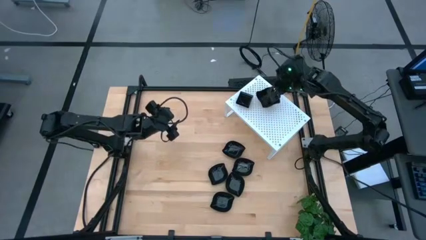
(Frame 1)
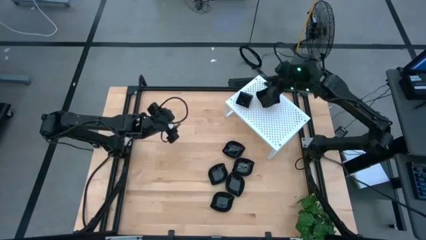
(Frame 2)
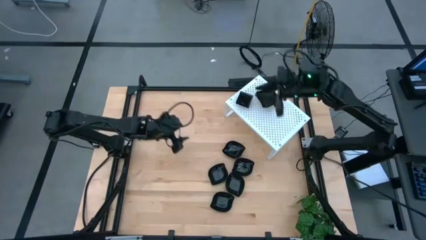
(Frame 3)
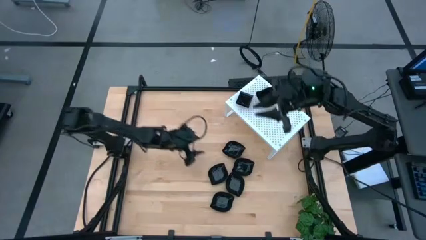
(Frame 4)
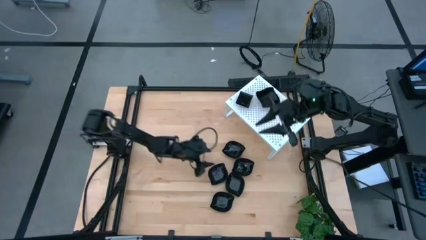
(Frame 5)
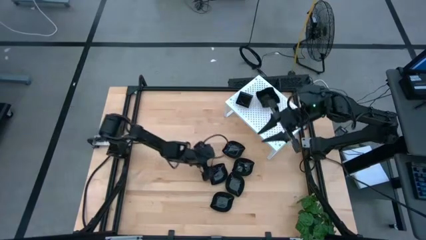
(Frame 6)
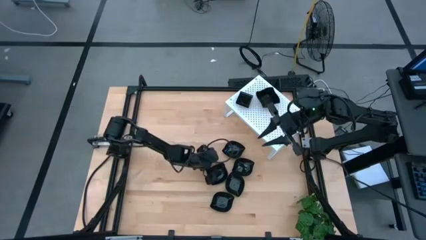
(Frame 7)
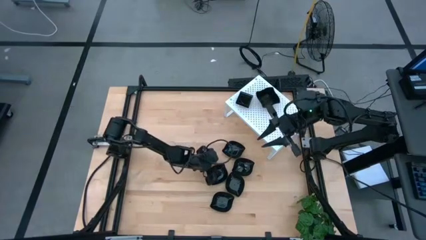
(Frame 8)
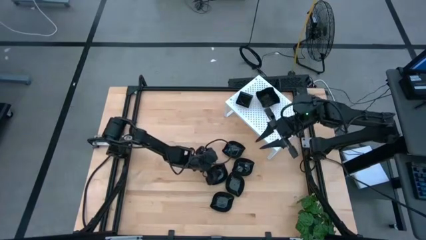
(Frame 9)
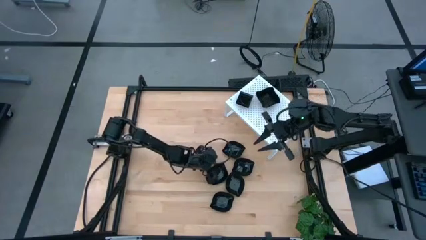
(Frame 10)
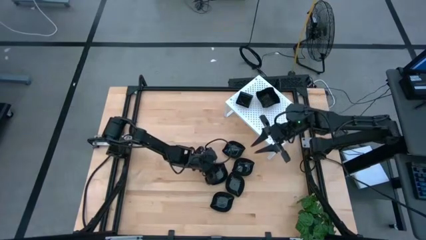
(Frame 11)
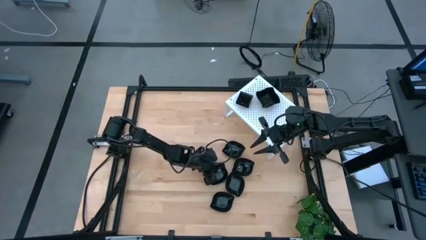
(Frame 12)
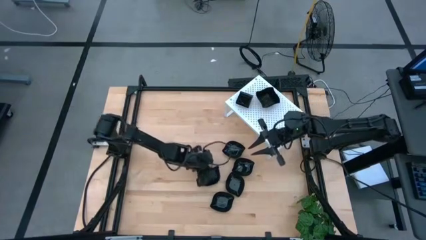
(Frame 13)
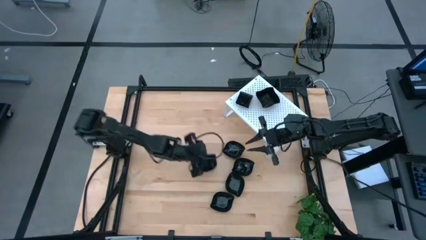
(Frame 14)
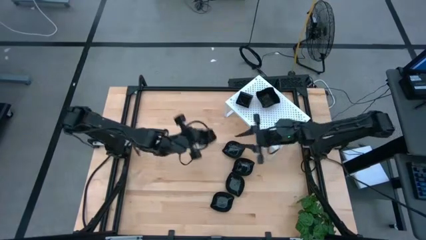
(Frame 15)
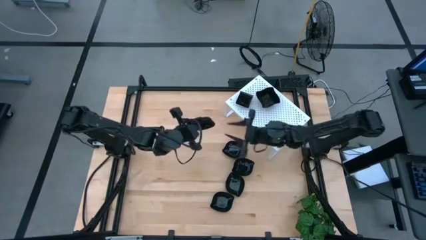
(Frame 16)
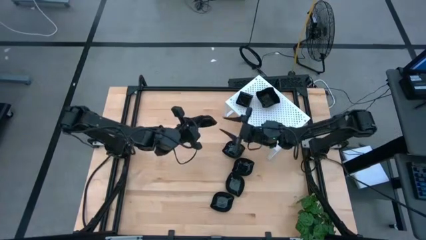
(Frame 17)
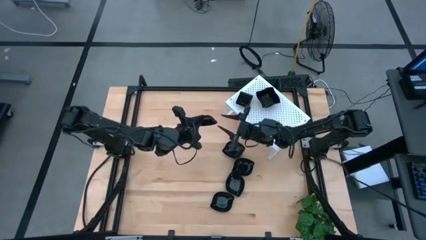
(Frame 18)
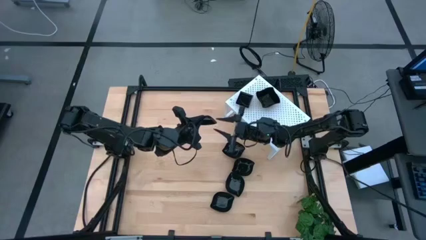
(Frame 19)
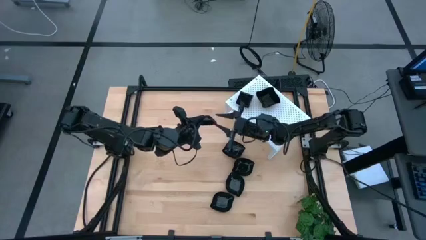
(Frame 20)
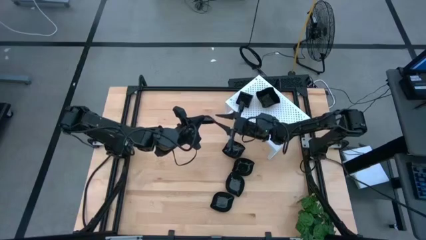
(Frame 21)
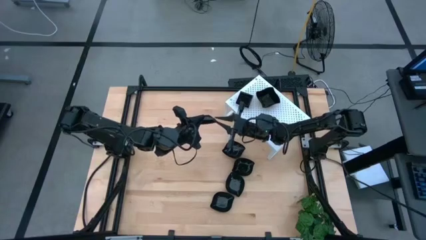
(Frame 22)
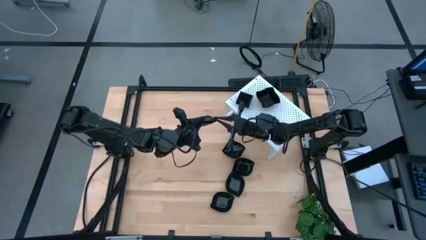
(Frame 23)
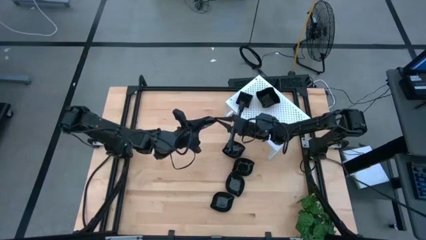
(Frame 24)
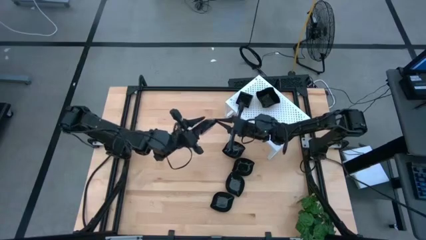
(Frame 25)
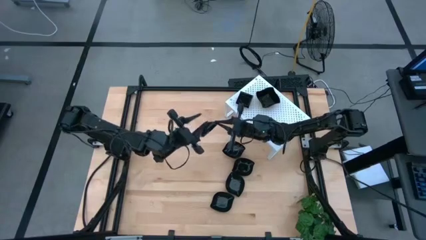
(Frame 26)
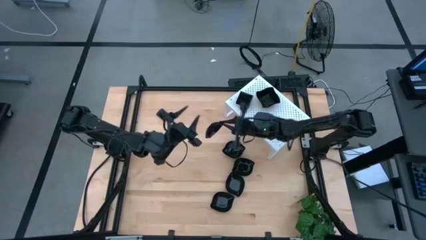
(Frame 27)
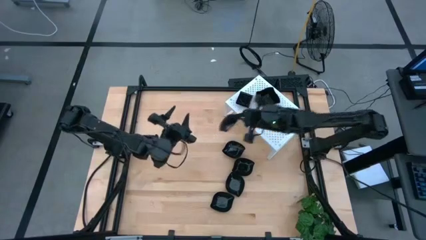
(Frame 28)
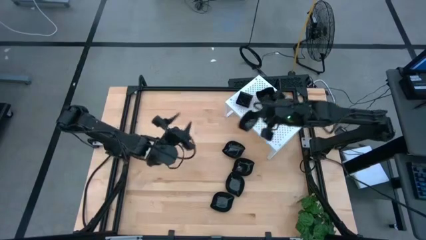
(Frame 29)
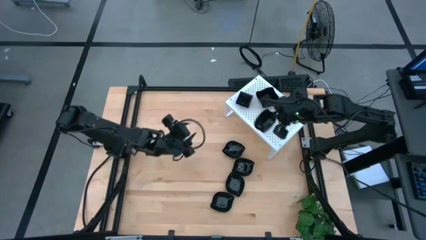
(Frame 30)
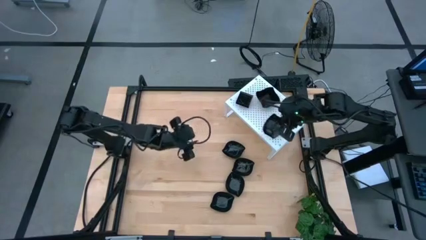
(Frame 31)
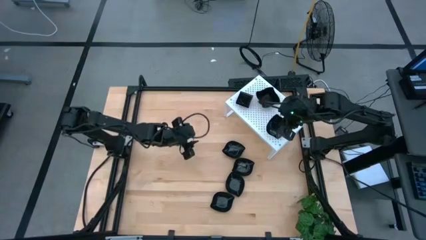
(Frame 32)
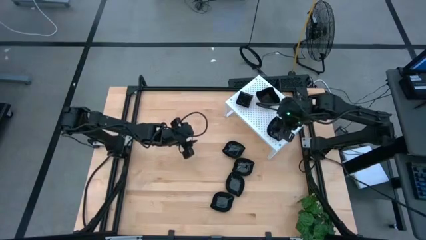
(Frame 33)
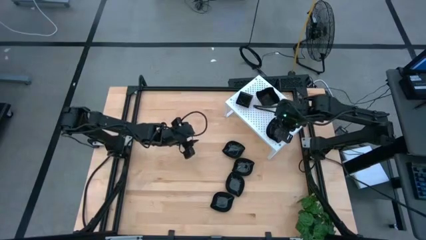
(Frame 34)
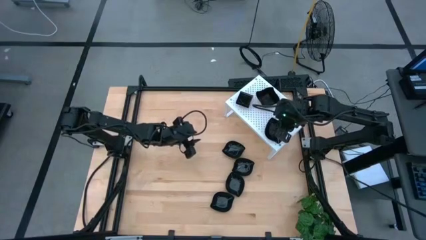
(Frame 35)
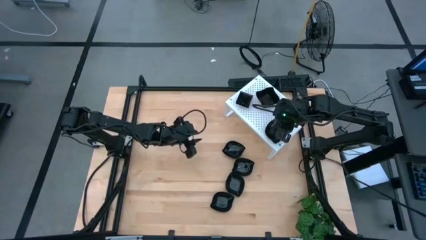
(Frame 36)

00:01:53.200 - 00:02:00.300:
Task: Pick & Place Mini shaped plates
Put the black leaf shaped plate on the shelf

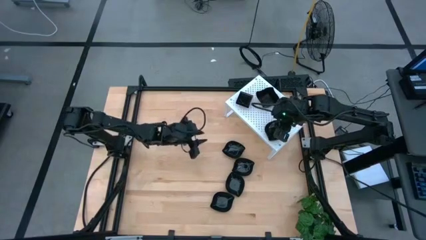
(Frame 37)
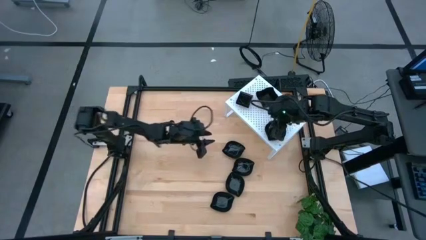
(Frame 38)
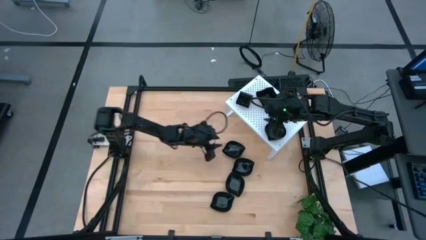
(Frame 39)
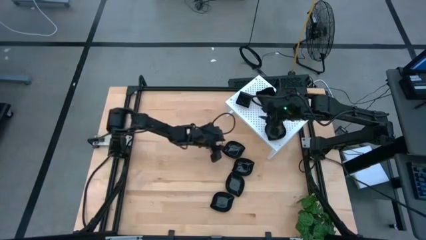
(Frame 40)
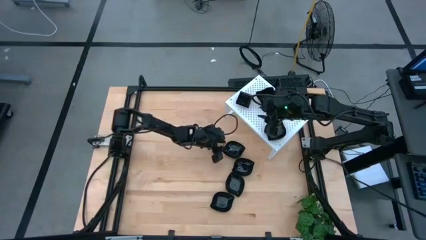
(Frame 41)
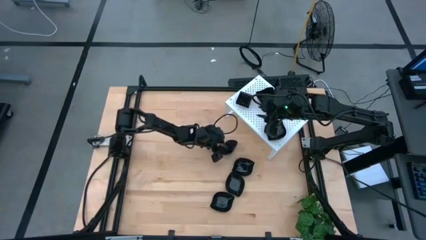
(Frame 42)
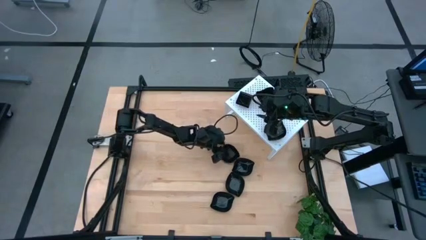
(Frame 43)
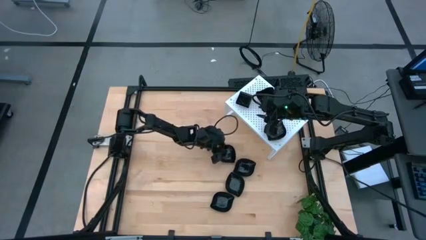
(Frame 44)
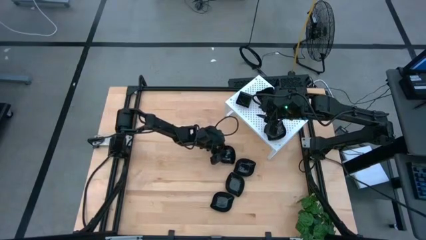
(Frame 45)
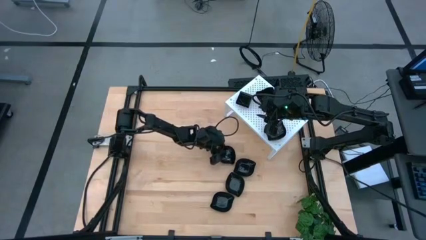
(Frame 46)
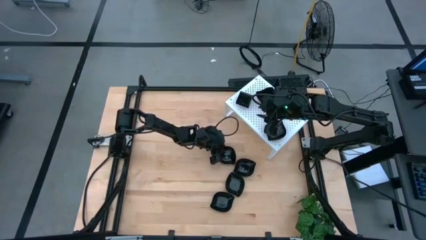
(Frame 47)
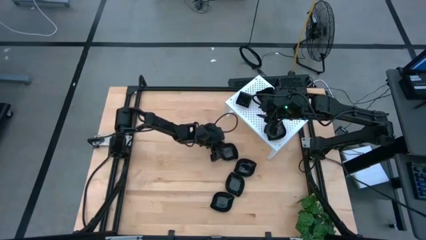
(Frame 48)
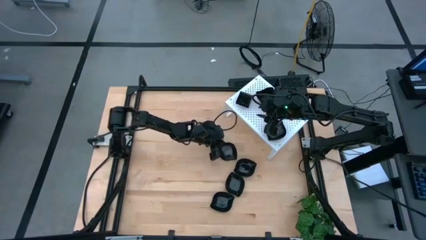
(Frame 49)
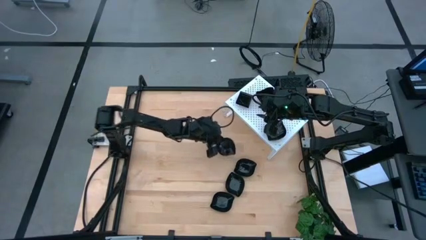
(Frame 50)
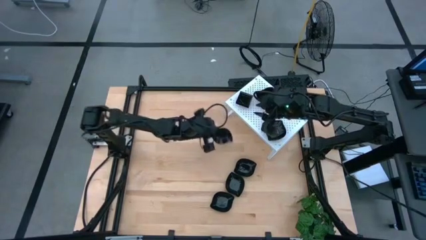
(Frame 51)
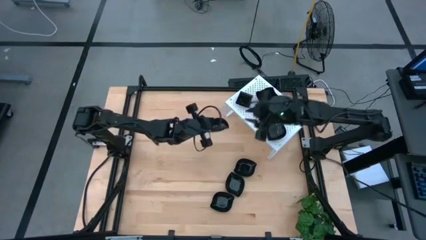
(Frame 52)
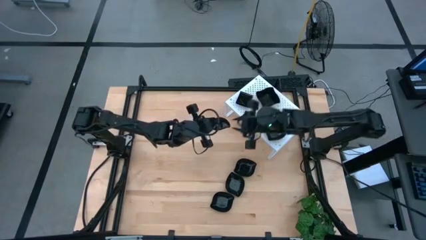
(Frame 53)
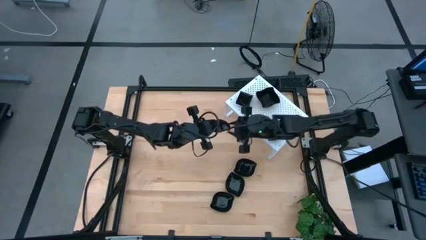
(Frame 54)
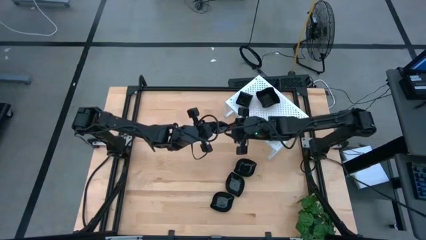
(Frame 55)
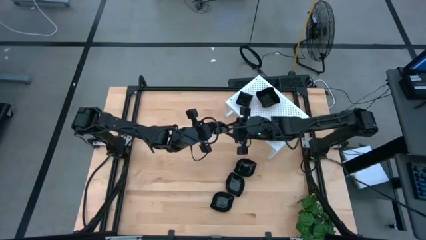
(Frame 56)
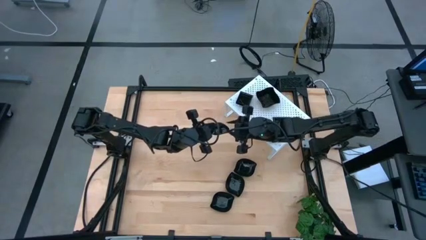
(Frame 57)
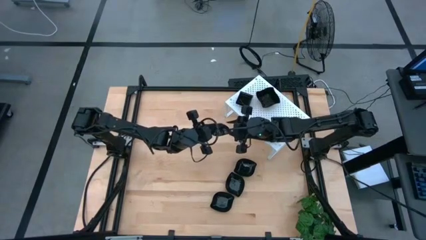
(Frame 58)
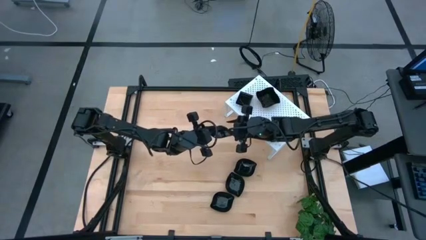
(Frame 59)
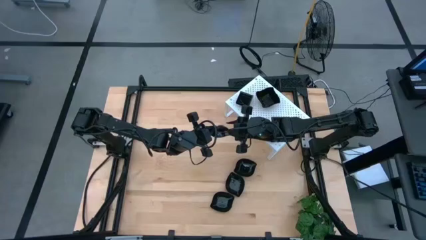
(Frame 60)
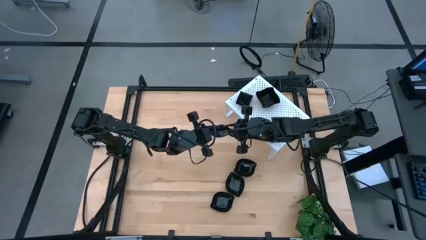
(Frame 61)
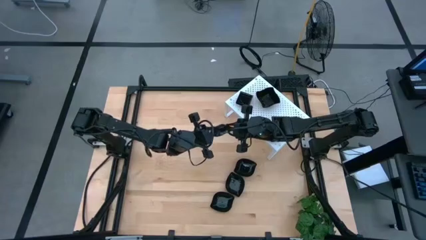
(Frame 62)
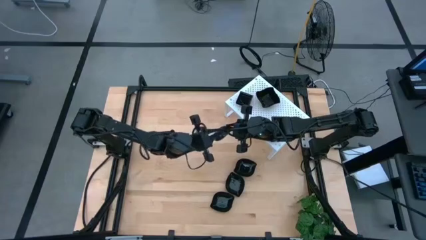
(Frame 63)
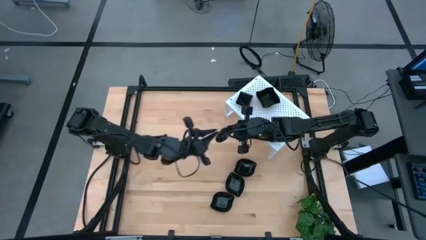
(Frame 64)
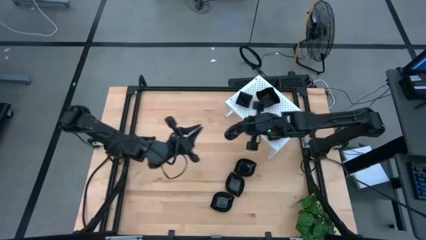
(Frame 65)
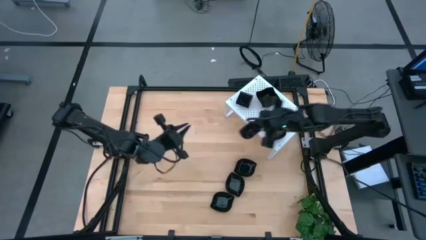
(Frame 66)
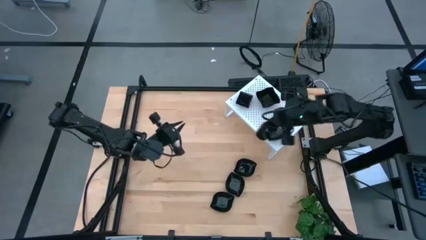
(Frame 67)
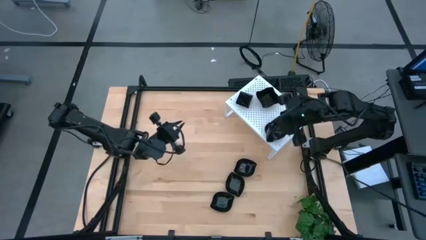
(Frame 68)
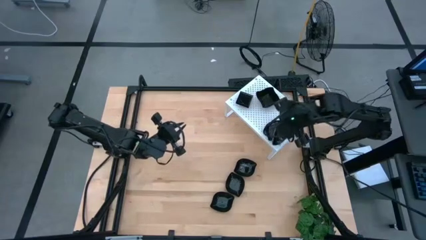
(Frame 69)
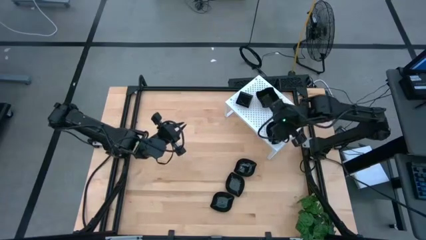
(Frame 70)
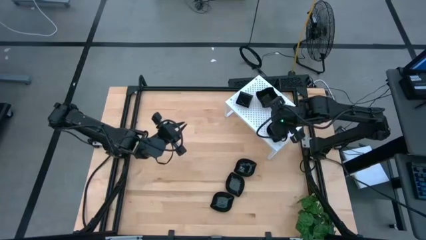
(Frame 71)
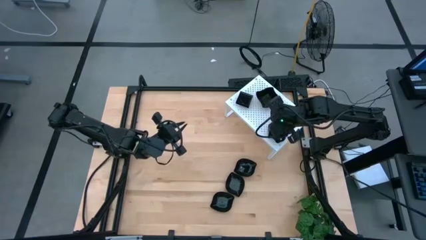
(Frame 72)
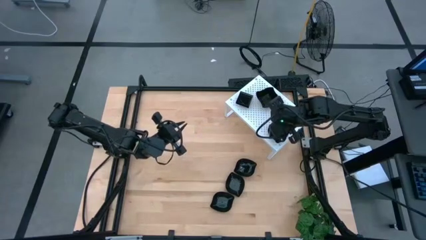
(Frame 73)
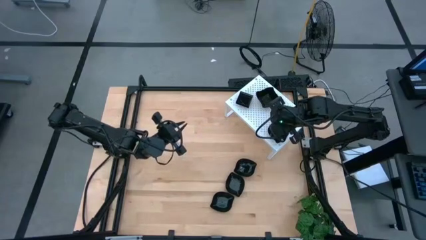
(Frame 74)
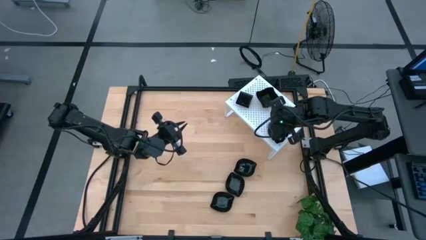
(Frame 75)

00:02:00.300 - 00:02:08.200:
Stack the black leaf shaped plate on top of the other black leaf shaped plate on the shelf

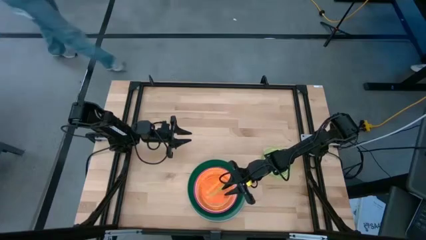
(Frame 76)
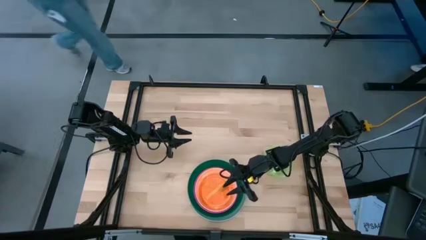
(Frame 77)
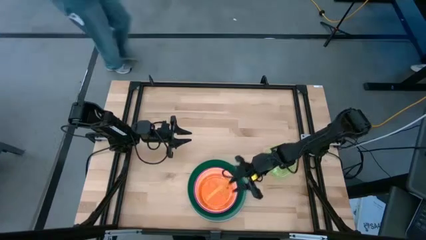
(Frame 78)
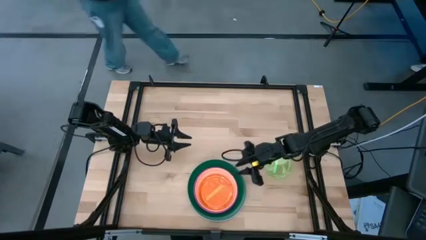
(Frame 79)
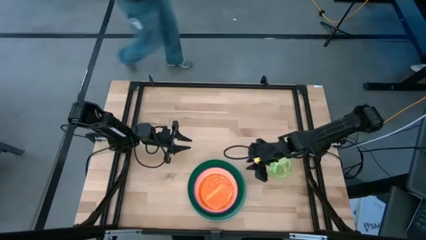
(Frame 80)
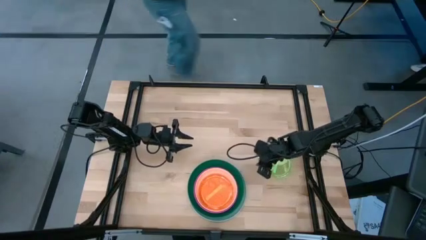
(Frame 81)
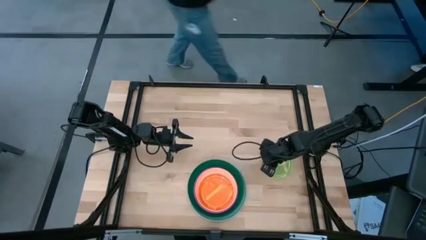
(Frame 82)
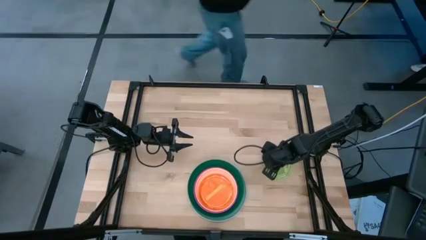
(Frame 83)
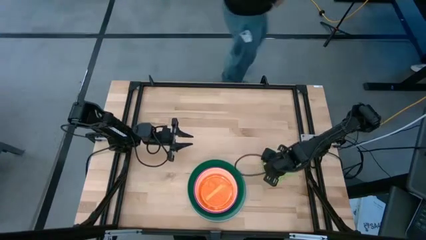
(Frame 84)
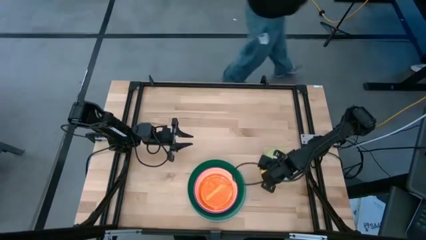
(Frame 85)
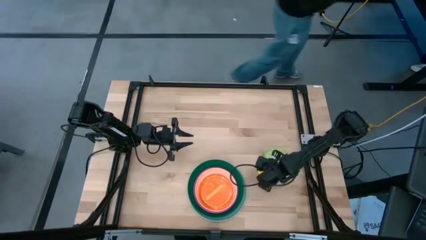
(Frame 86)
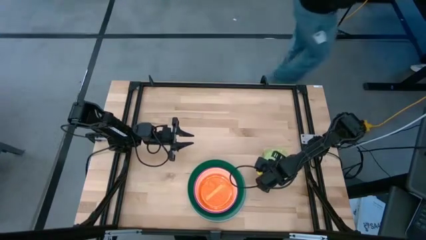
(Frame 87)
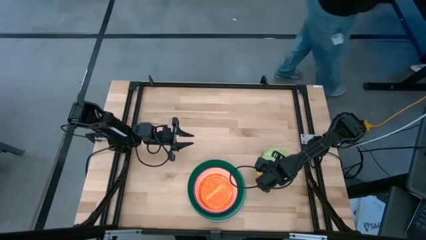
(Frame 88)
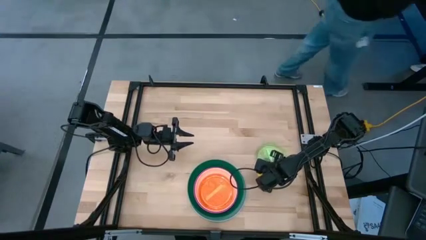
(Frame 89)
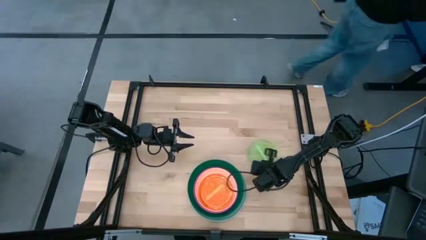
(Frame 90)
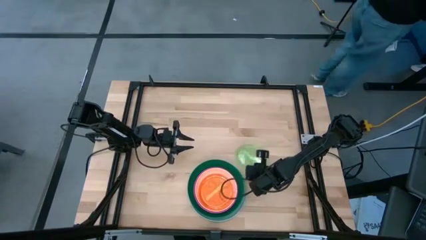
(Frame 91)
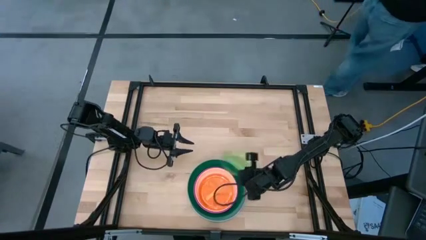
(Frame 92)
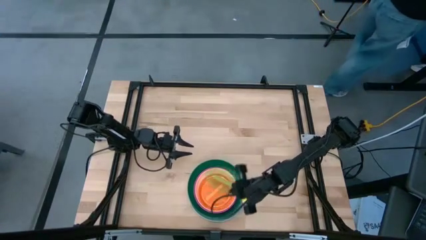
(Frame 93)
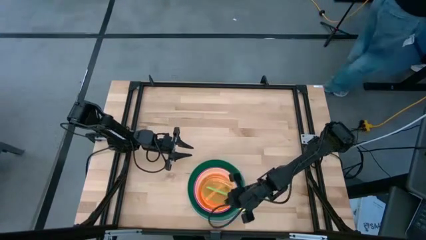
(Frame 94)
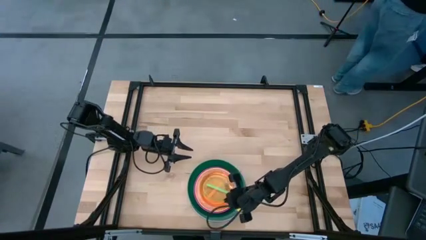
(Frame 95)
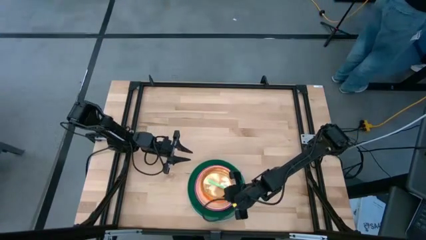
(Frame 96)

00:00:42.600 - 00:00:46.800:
Task: Stack plastic plates
Stack the transparent green plate on the transparent orange plate
